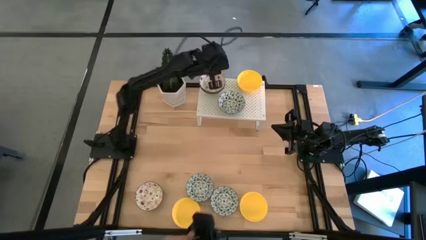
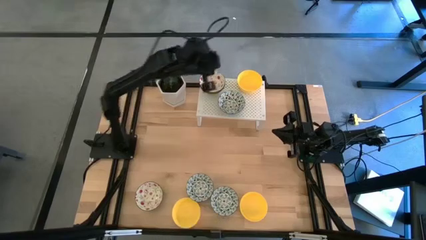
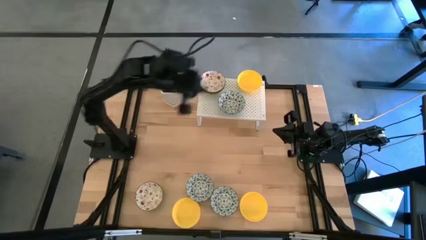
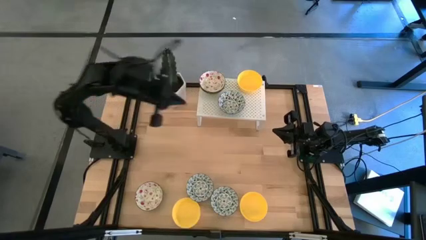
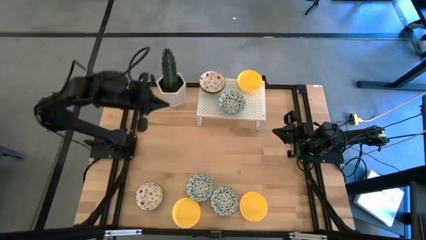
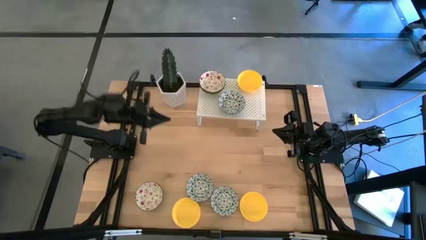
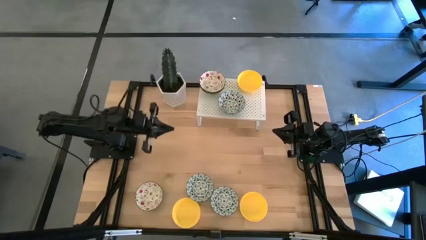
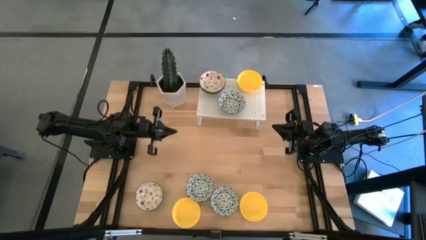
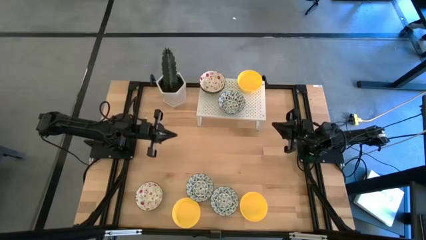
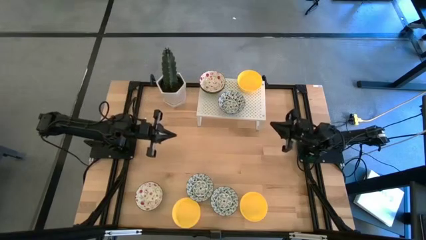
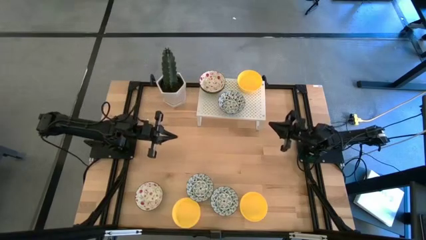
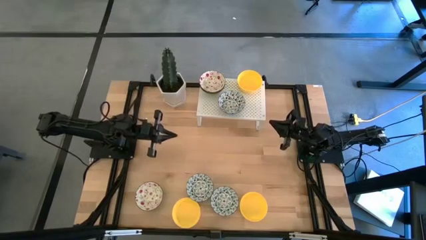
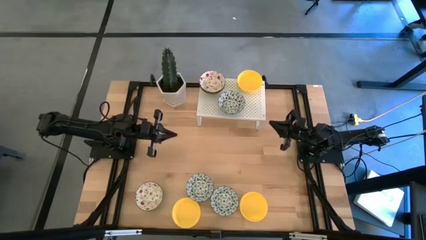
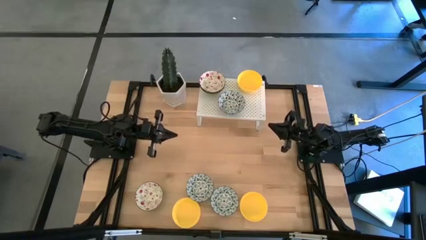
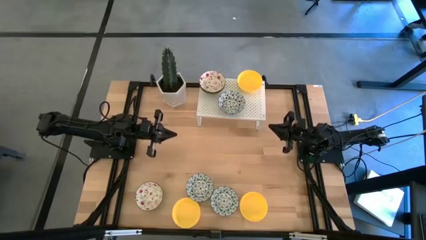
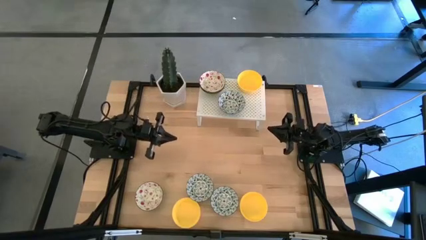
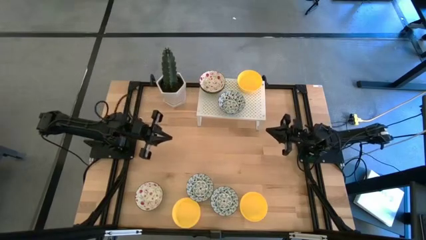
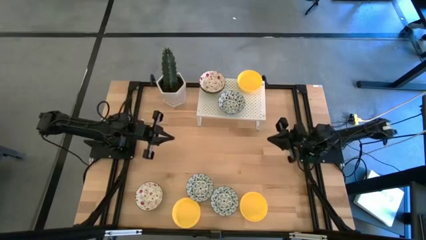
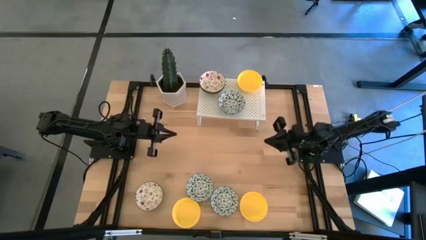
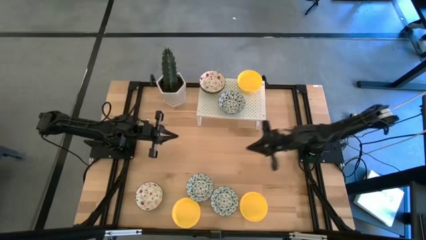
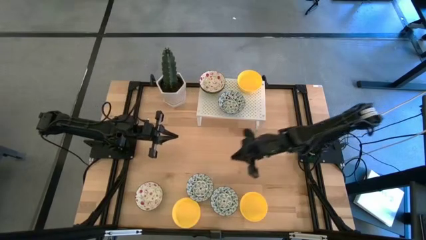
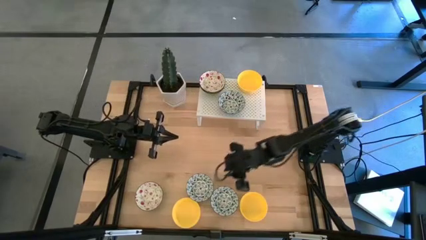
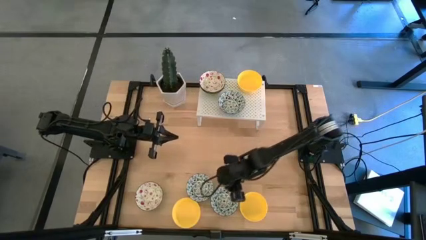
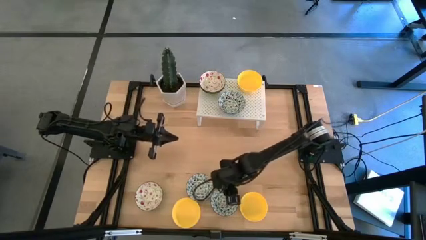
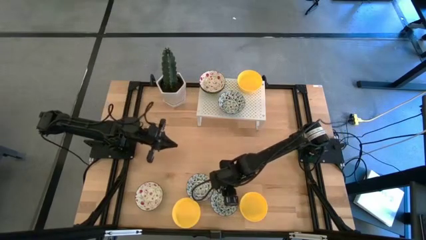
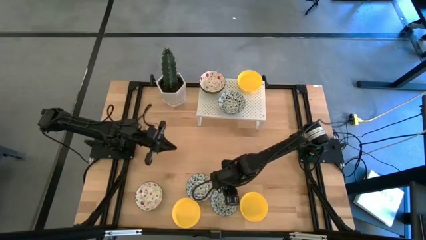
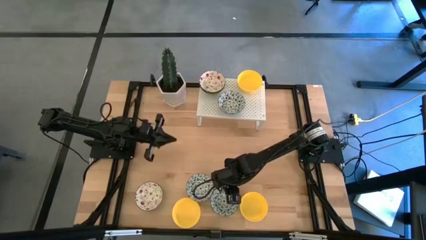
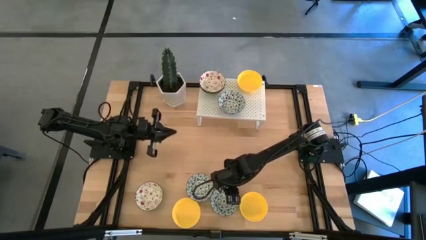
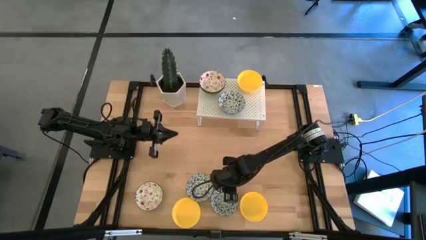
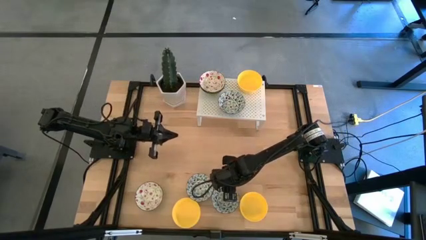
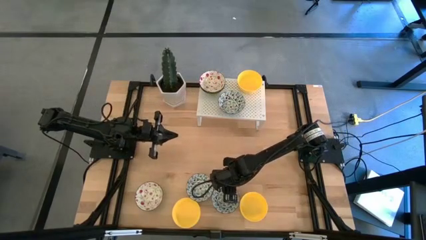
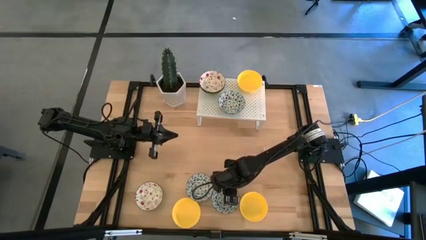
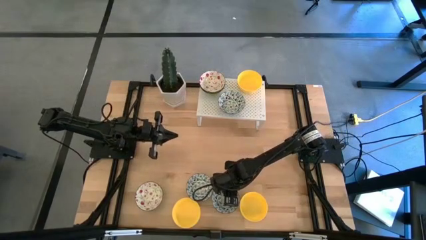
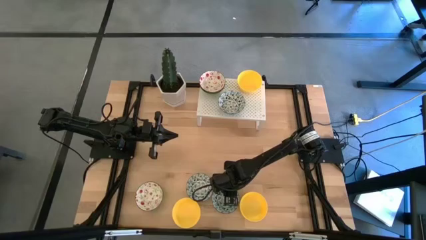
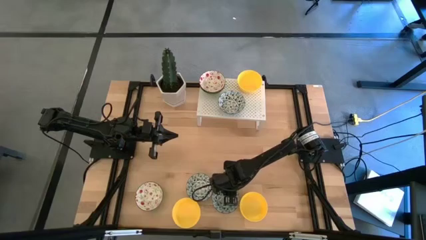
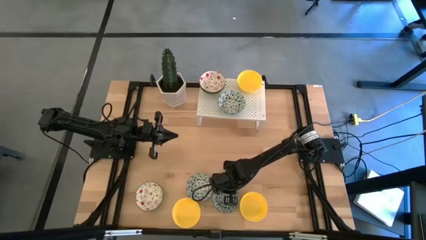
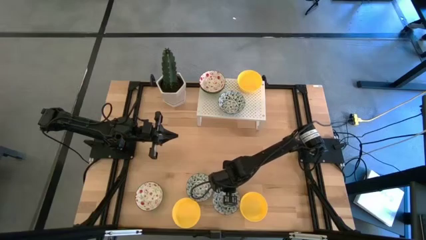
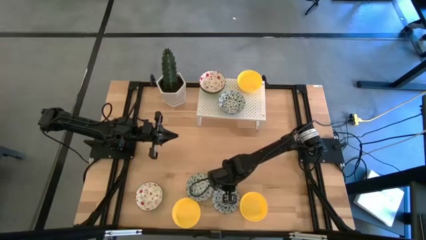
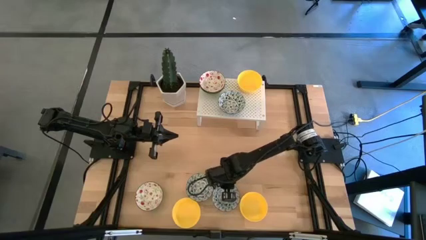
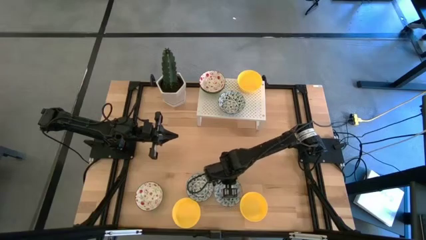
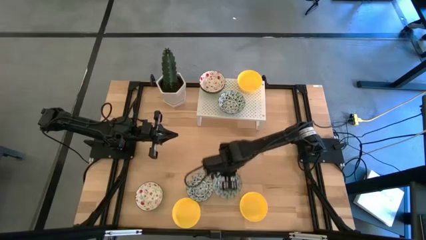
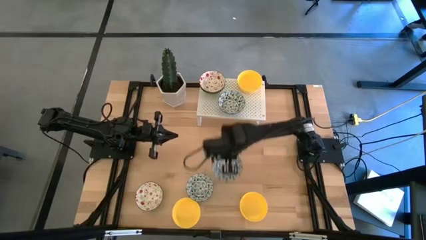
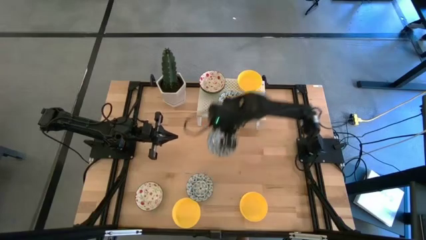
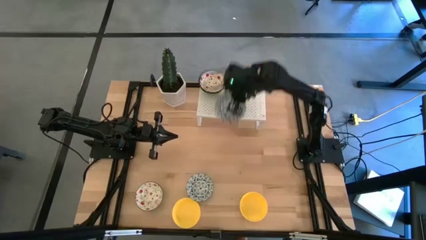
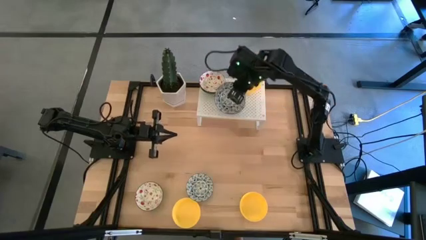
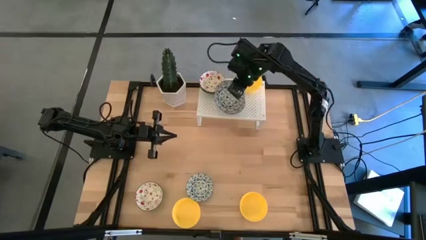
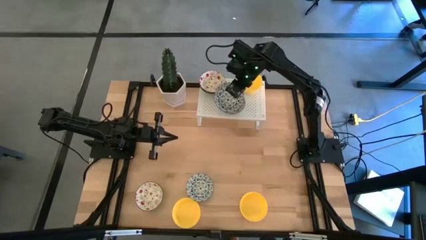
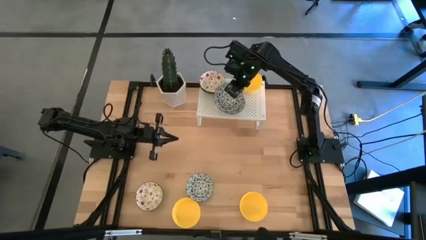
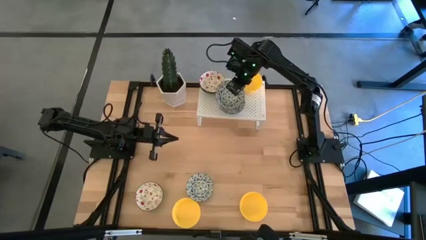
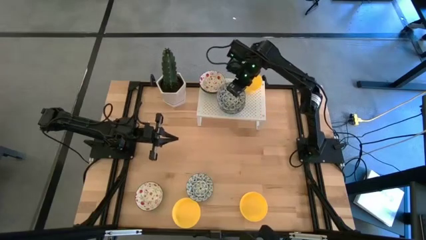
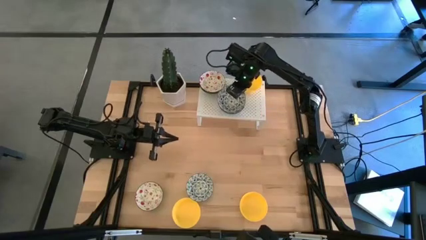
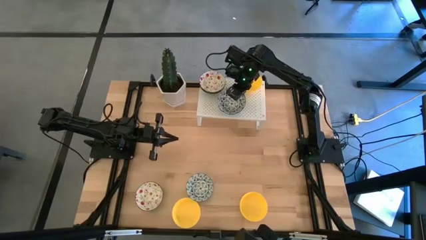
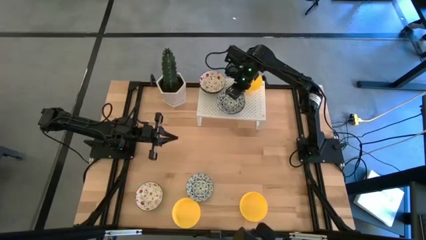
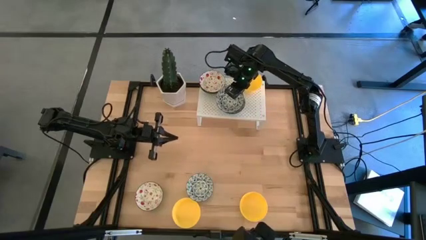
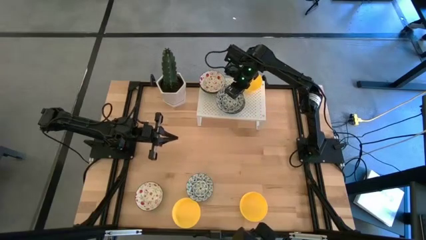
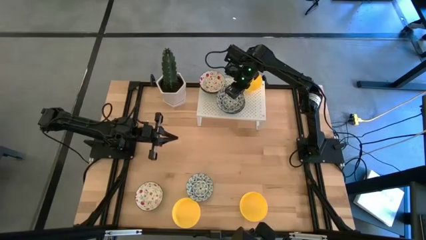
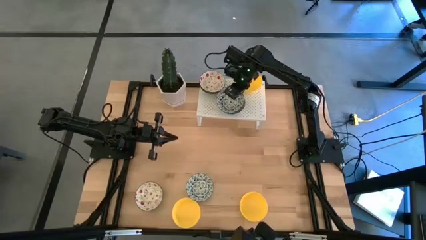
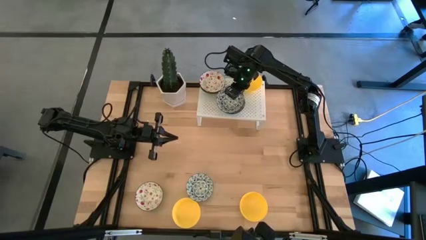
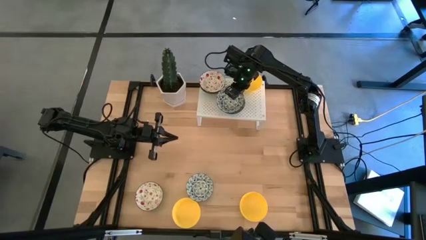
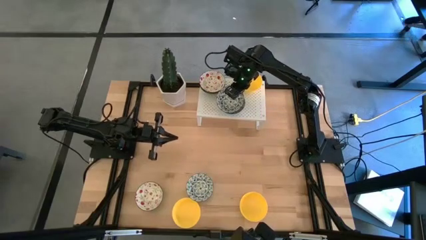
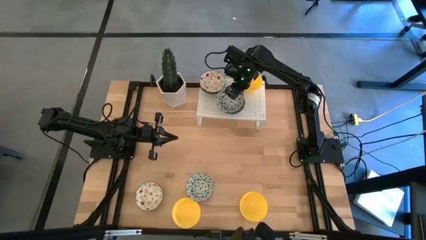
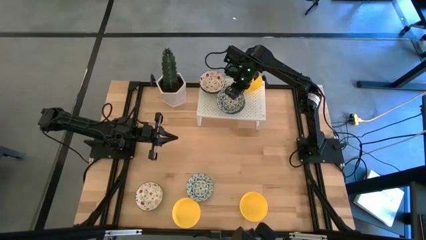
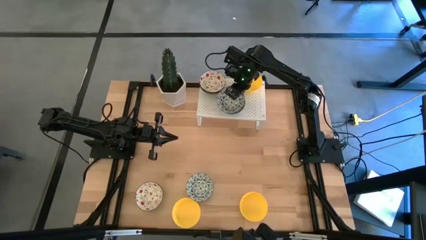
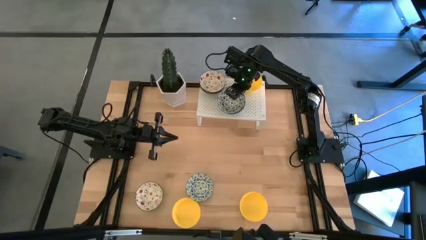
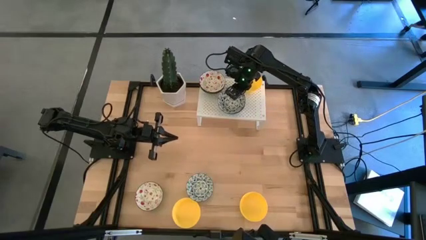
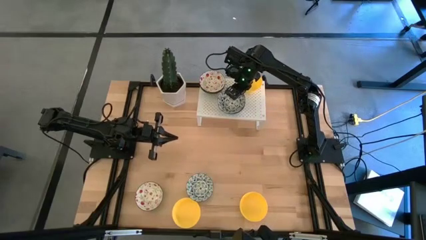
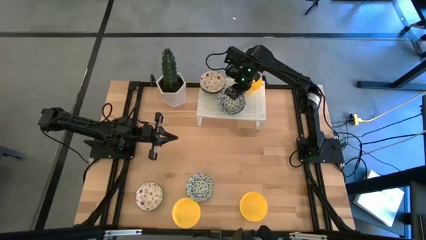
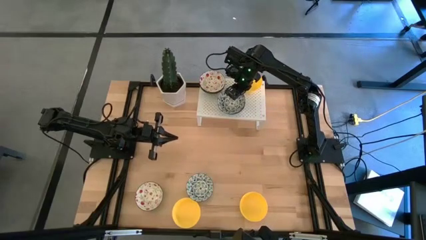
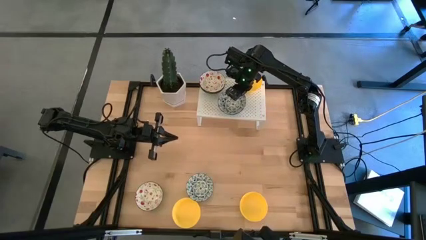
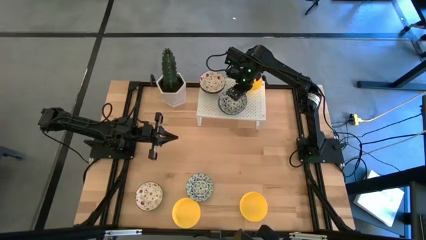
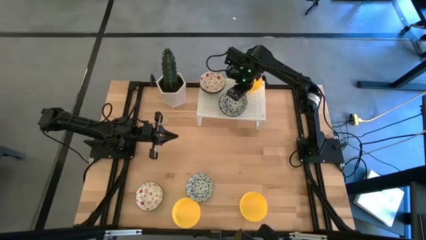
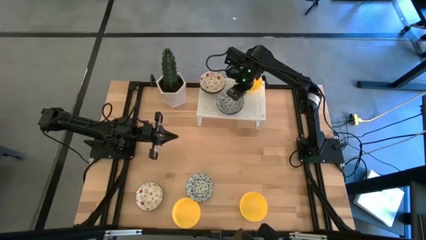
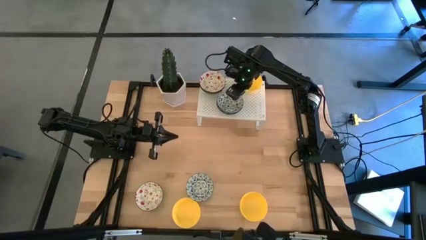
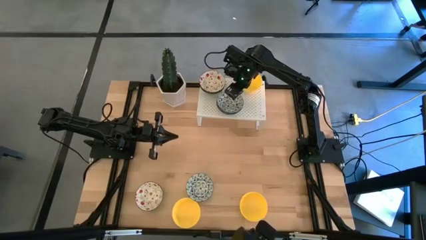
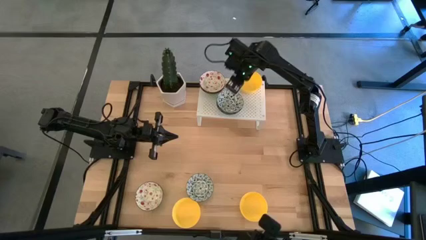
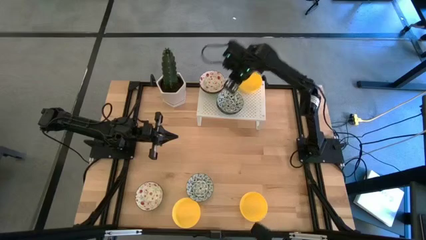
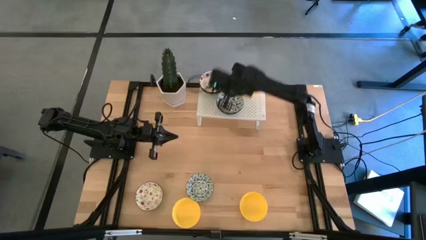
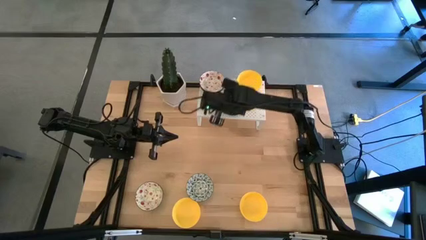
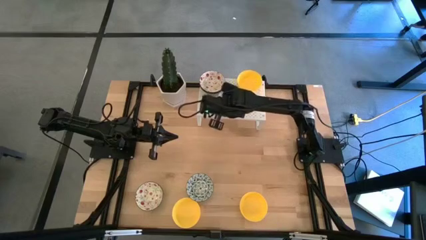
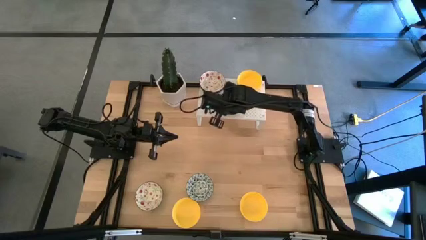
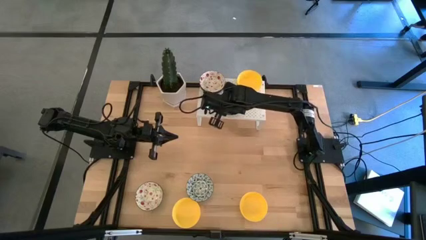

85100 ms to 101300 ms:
Task: Pick & Place Mini bowls
Stack the right green patterned bowl on the green patterned bowl on the shelf
